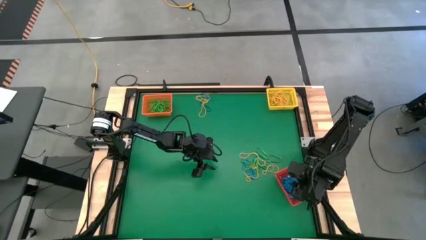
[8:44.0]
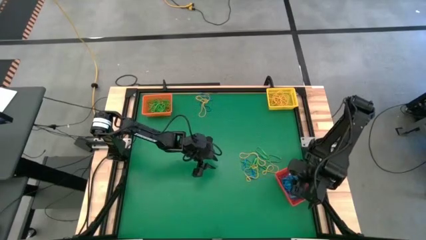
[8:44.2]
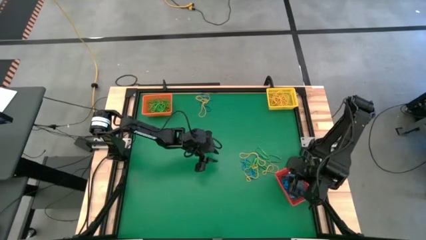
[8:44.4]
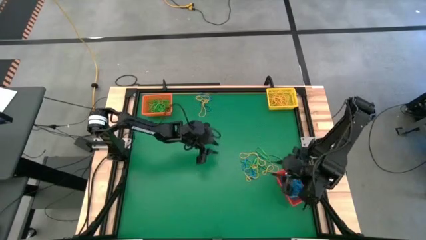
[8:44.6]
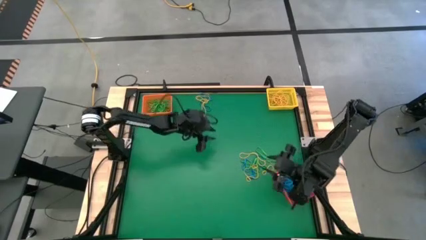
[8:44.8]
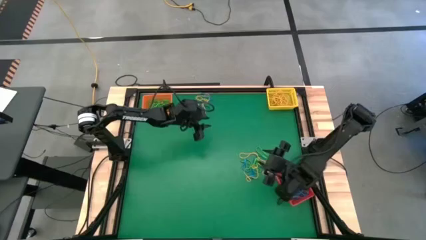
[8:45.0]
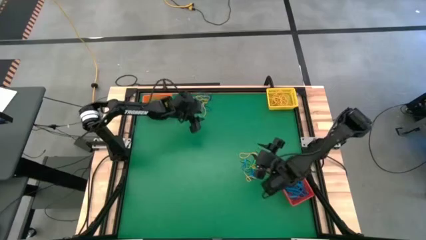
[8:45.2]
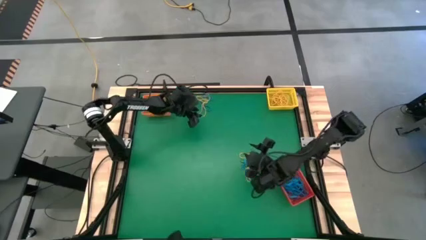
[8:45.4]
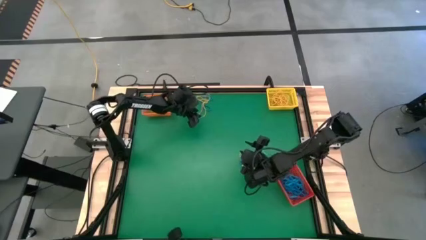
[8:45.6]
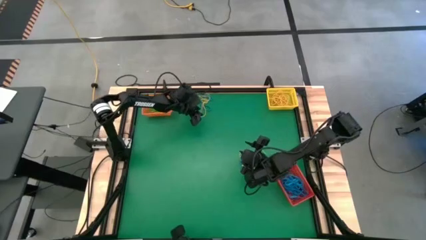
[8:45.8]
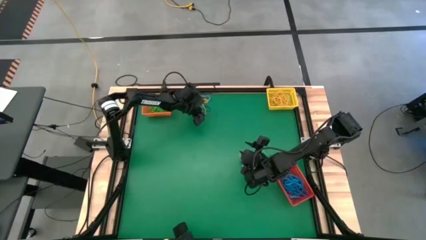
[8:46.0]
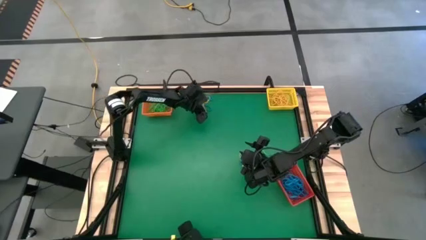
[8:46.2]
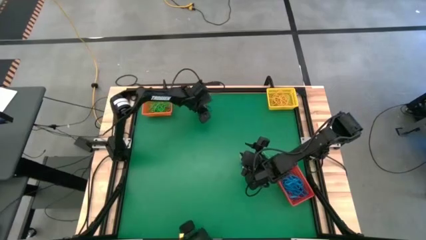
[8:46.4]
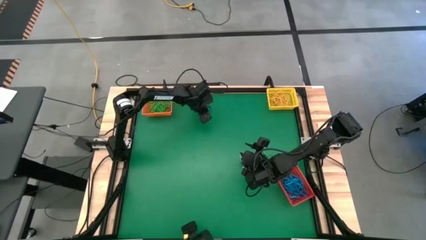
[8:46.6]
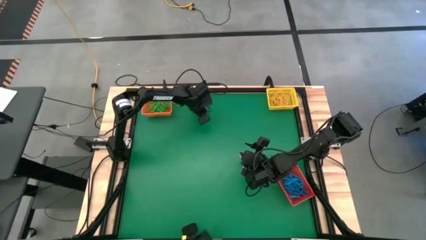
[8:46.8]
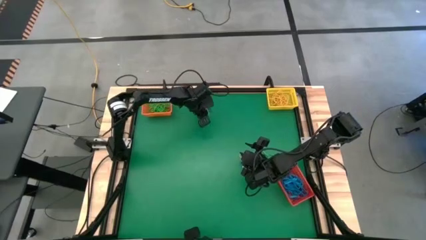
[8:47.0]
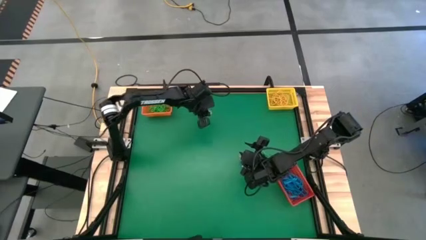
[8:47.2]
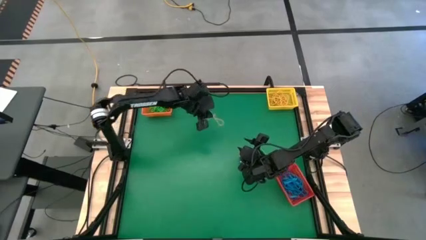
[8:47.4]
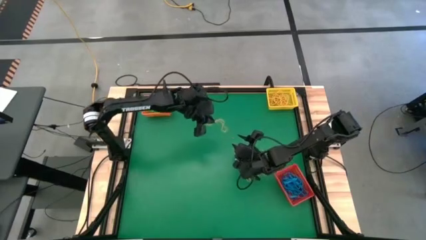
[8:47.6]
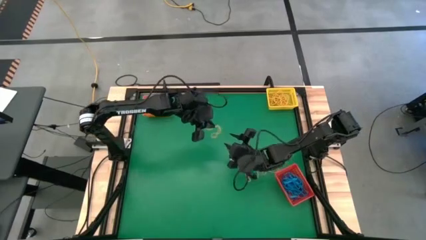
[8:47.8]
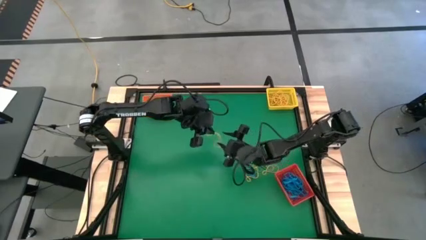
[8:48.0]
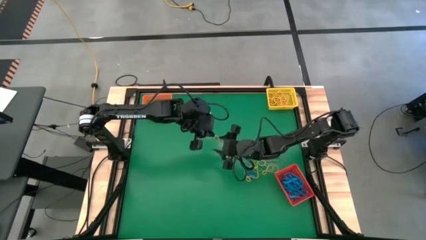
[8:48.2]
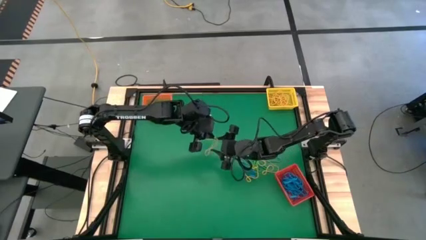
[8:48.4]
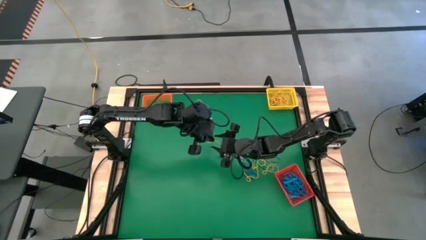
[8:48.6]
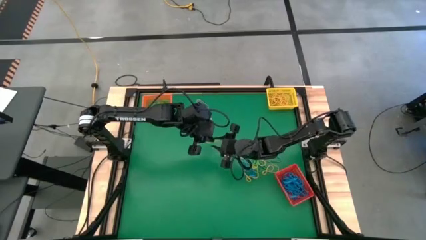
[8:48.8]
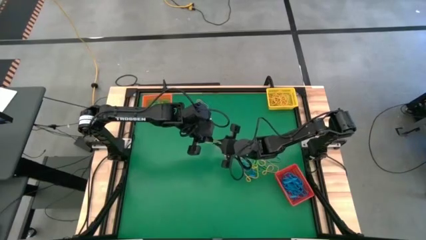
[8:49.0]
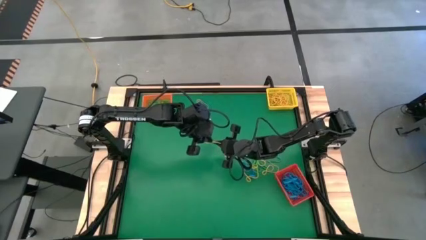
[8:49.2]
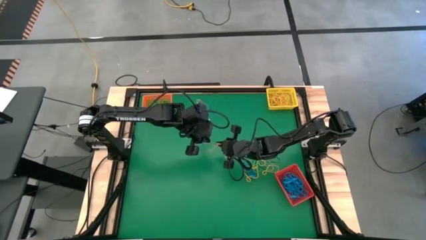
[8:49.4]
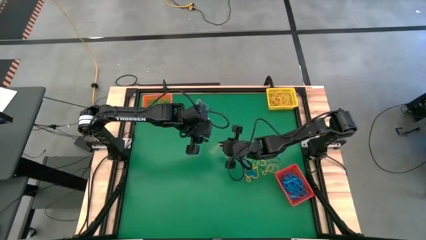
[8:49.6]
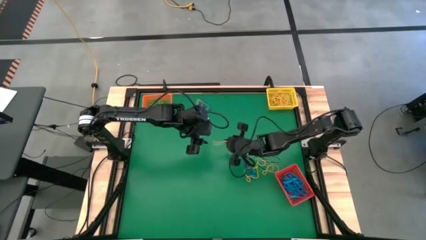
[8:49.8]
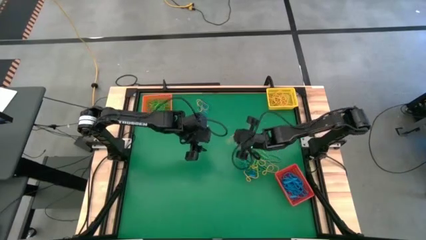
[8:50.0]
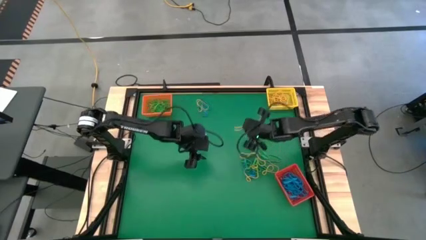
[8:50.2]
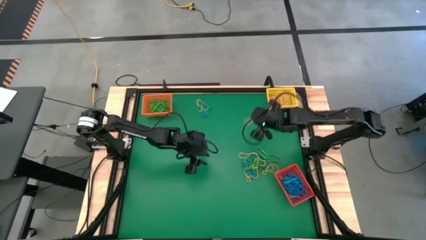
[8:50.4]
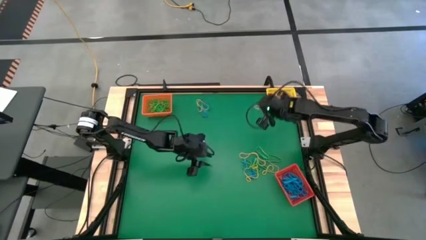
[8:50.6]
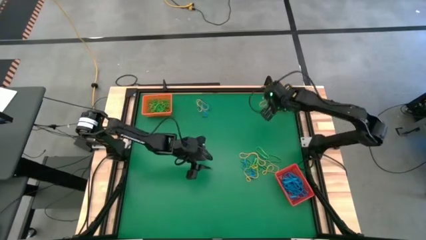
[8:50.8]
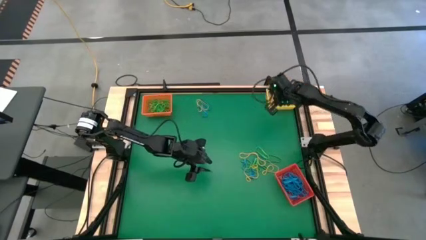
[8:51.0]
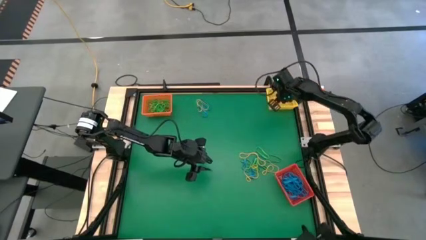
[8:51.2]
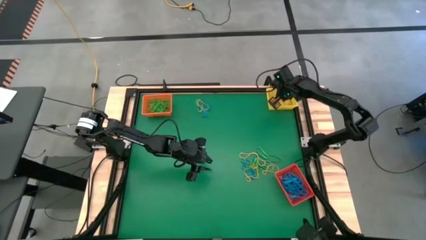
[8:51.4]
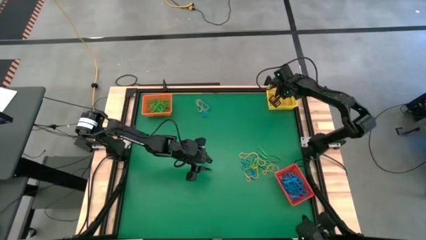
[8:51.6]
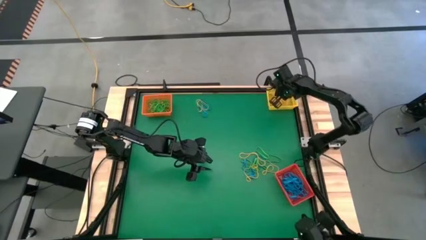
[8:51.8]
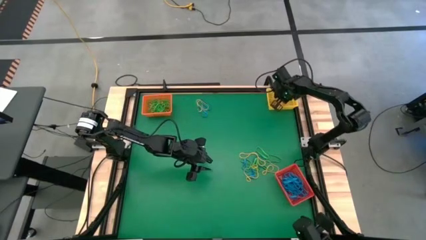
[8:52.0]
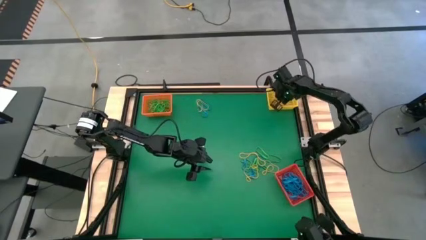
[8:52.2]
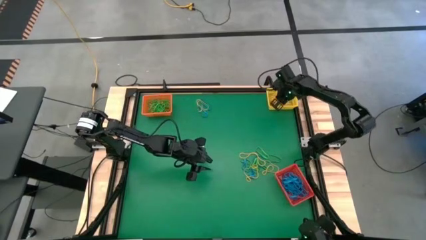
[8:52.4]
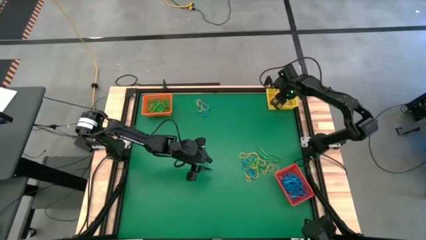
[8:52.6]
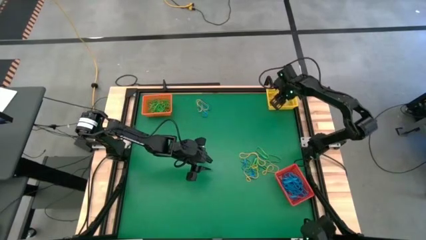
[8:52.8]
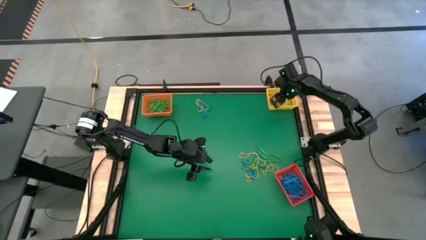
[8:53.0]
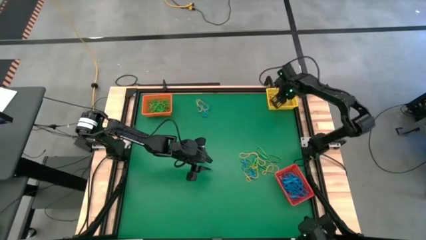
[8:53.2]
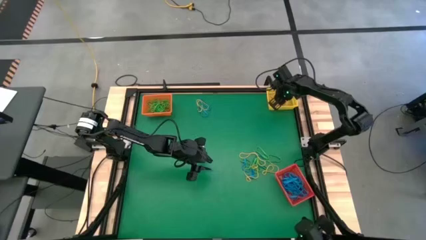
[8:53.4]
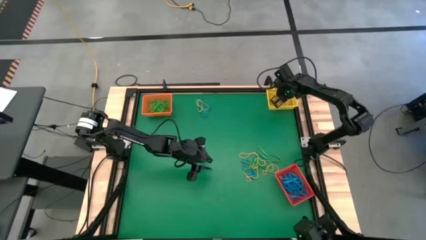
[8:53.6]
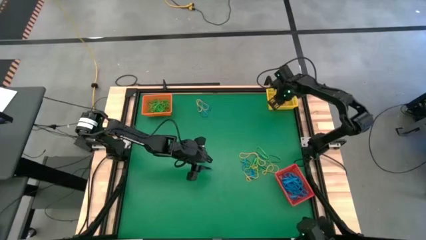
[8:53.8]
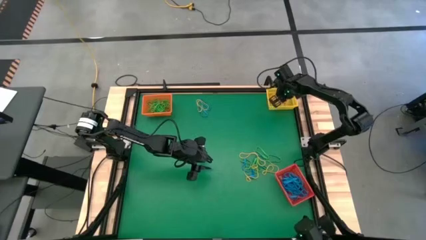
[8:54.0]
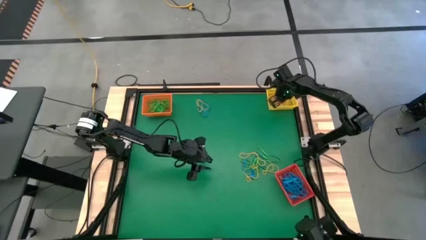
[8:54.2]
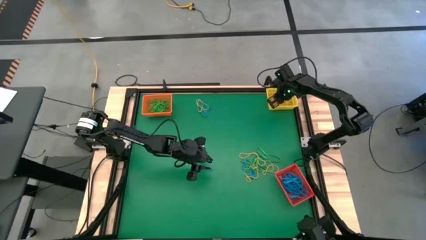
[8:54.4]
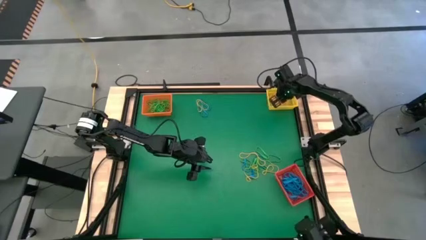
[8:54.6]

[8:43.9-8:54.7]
Task: Sort rubber bands into baskets
Put the yellow rubber band into the yellow bin

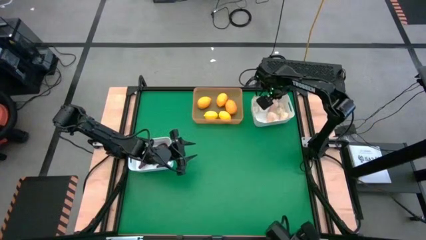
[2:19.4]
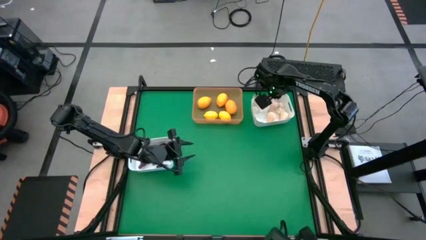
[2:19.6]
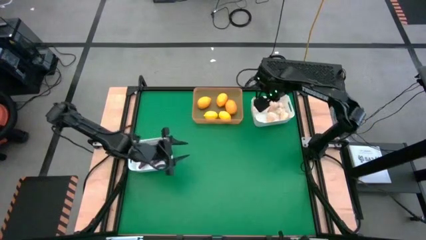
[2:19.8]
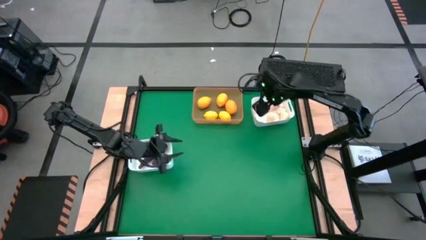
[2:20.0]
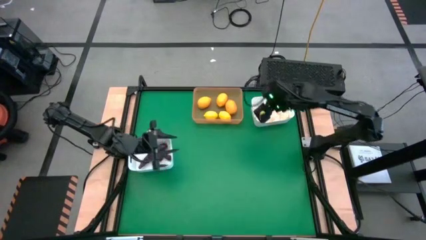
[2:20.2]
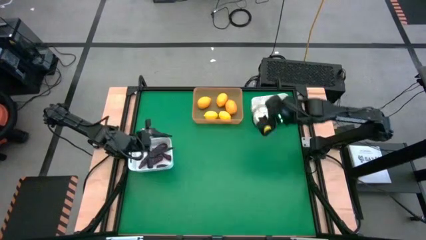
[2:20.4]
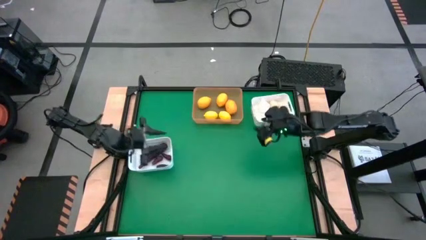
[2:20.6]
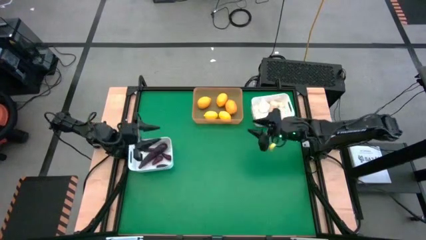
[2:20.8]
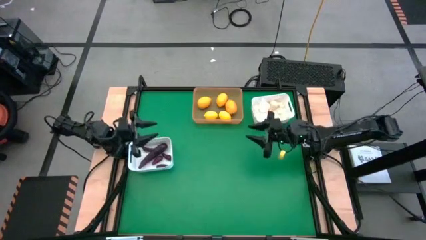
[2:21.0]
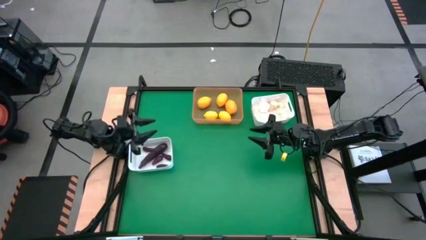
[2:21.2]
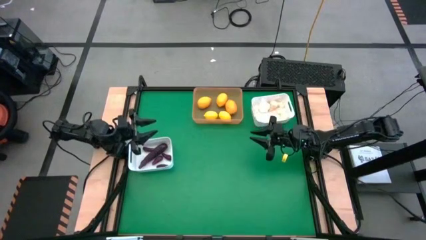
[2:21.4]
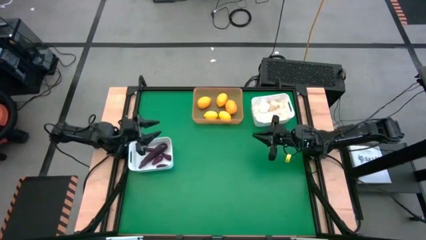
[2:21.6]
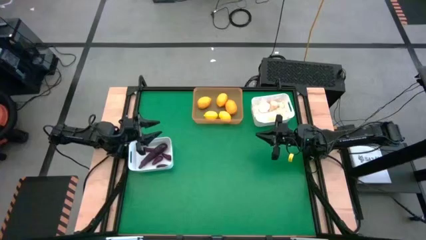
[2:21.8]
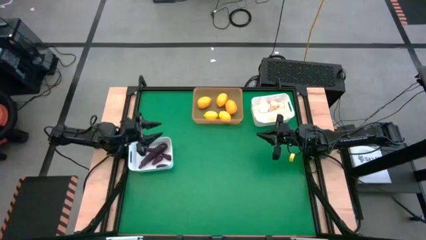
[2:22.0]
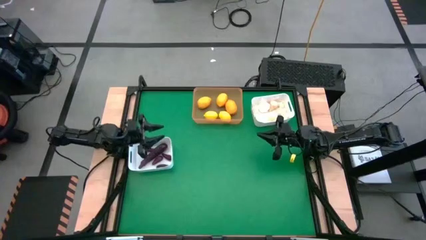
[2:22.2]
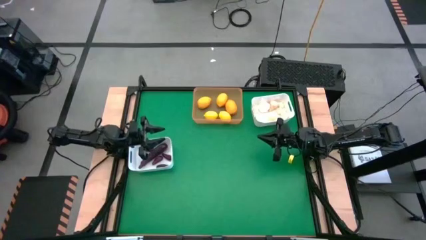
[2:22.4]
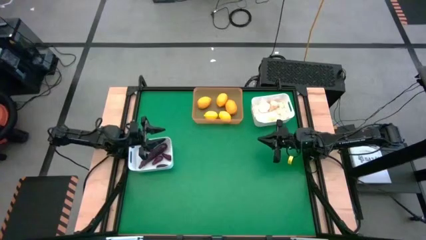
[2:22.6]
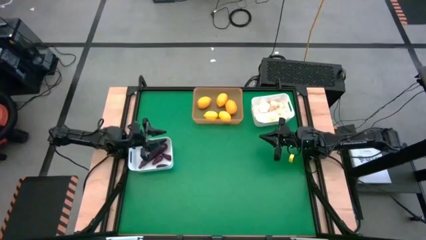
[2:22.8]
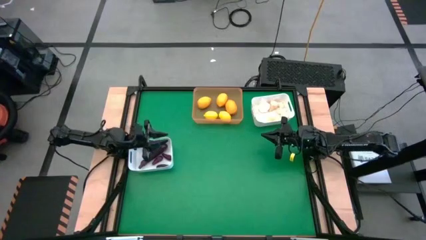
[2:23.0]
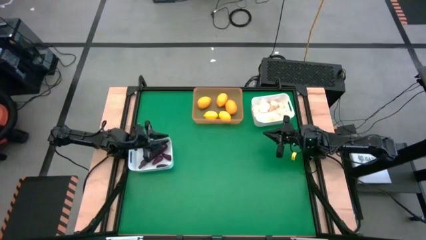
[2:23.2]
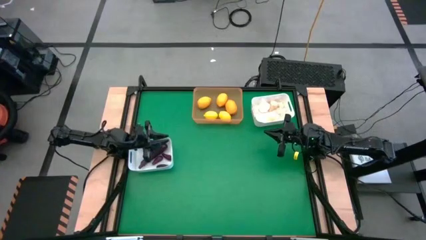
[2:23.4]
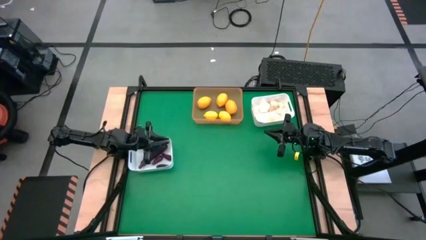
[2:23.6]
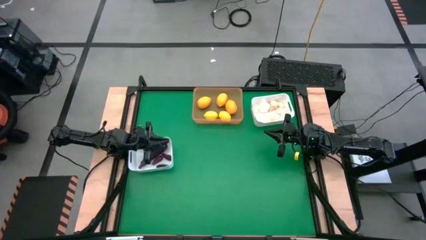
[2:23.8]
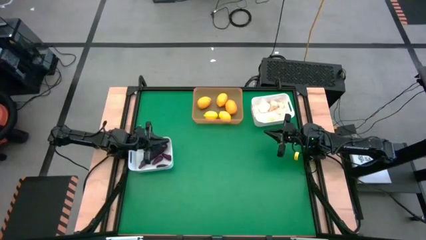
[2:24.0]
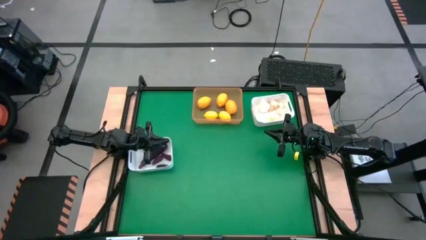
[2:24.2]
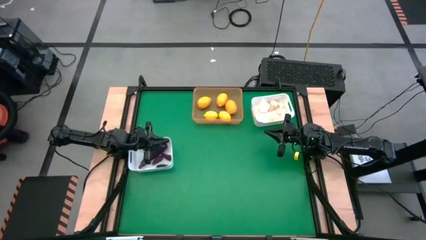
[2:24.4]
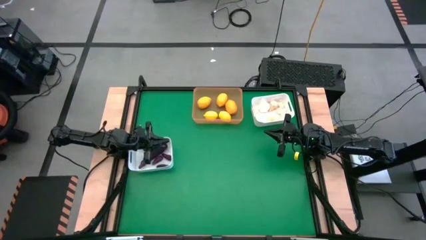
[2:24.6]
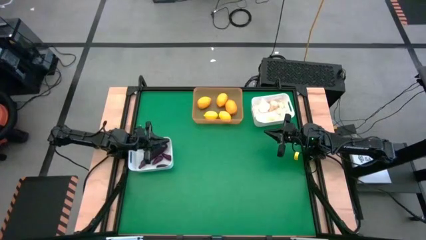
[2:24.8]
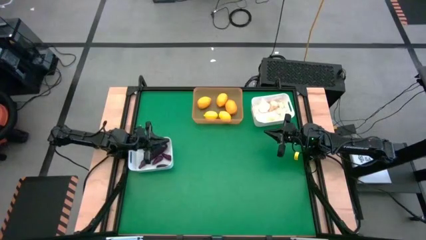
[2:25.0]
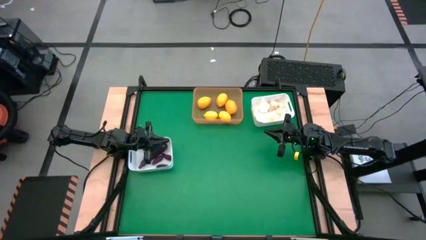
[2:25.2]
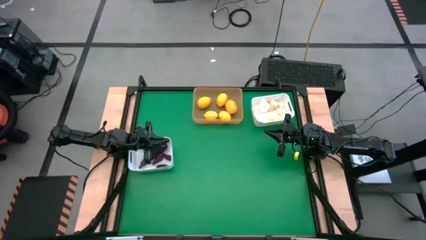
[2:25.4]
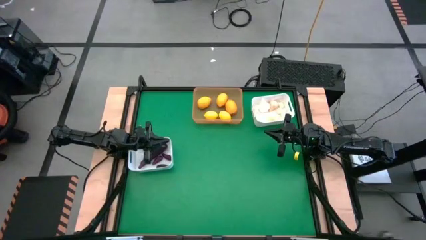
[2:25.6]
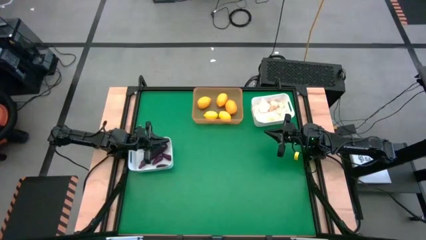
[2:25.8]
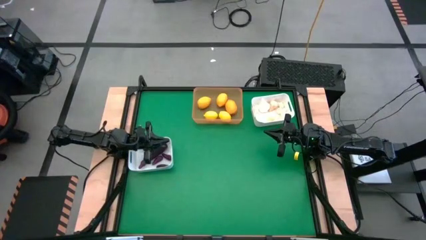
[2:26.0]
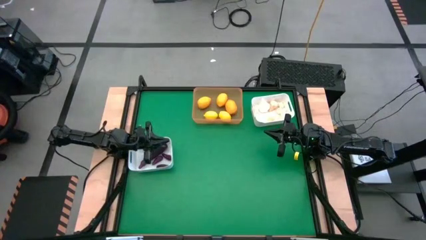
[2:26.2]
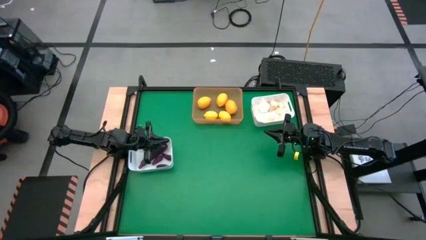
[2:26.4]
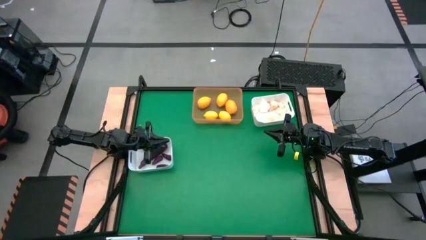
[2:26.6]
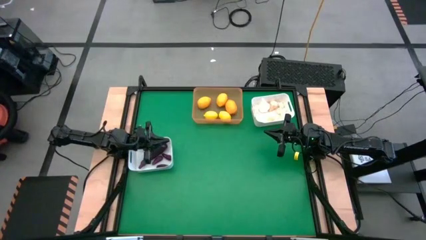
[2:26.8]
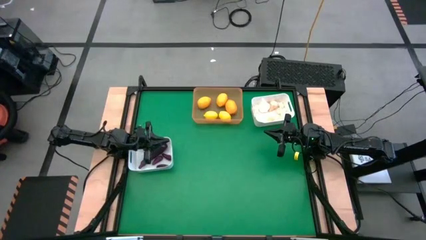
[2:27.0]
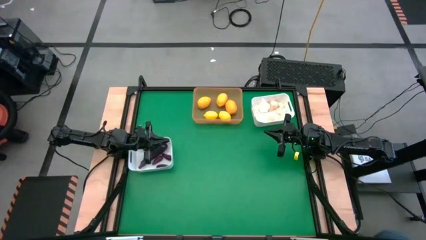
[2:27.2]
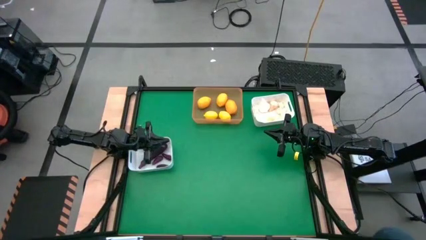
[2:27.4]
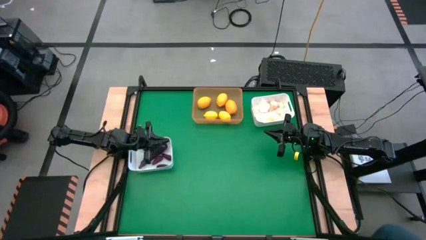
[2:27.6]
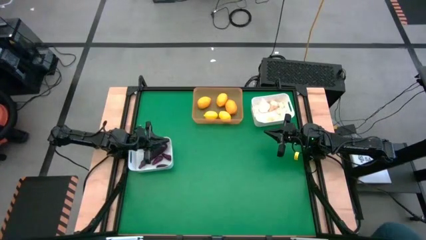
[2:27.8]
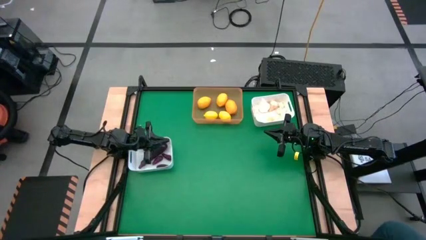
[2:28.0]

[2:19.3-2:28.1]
Task: Sort produce into baskets
Return to Home Position
